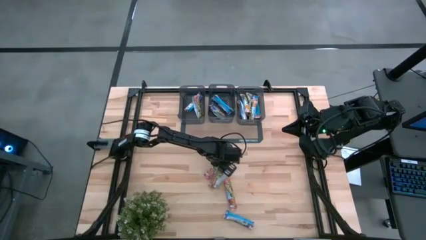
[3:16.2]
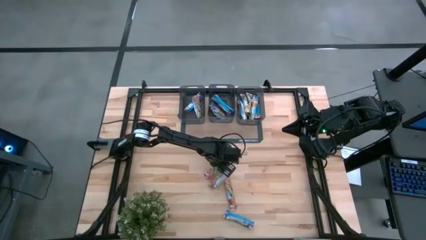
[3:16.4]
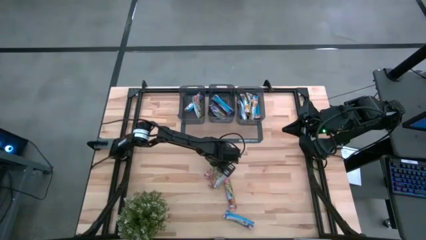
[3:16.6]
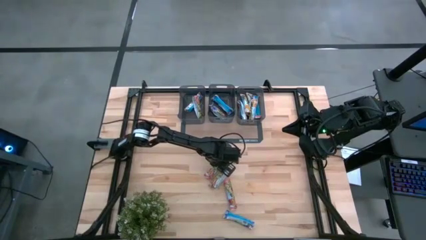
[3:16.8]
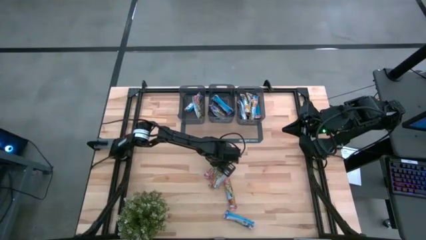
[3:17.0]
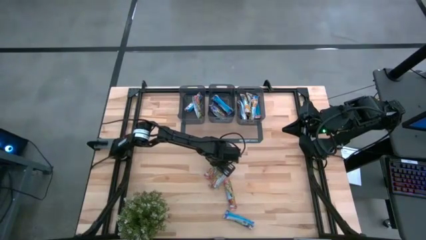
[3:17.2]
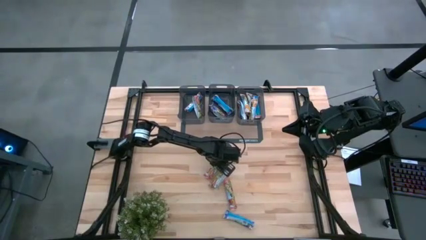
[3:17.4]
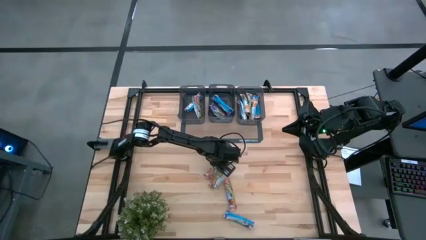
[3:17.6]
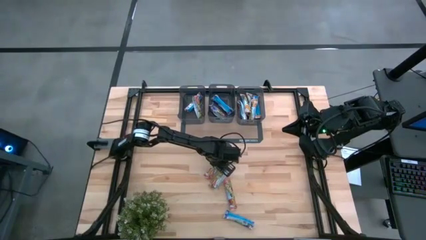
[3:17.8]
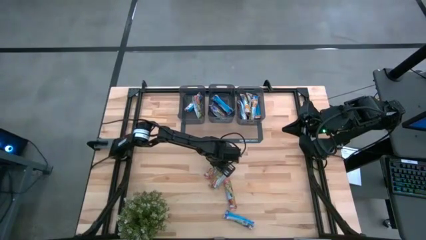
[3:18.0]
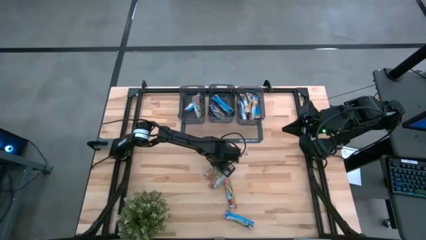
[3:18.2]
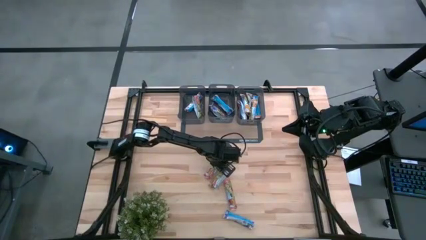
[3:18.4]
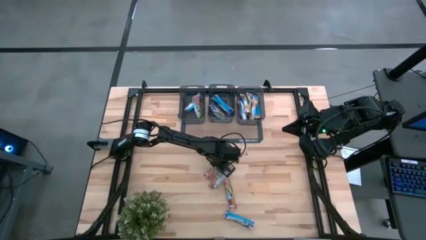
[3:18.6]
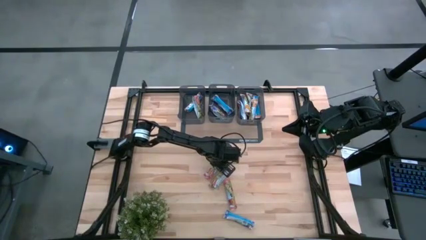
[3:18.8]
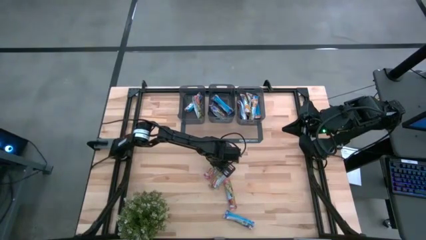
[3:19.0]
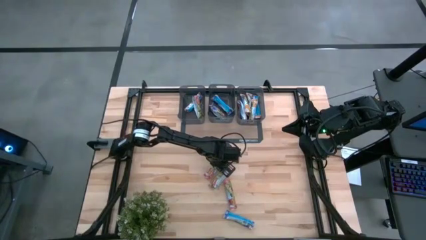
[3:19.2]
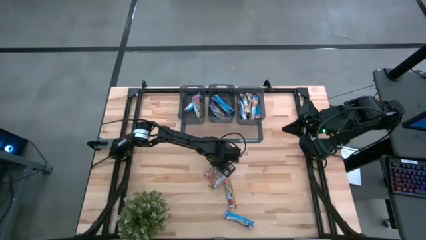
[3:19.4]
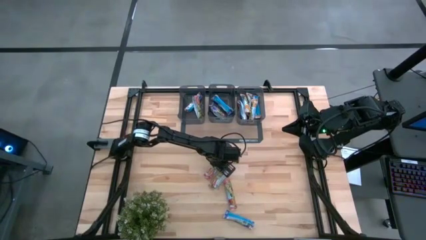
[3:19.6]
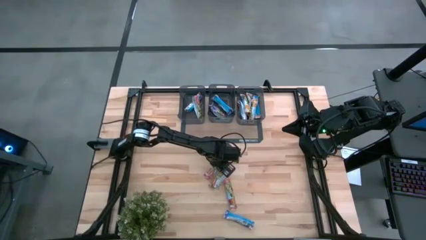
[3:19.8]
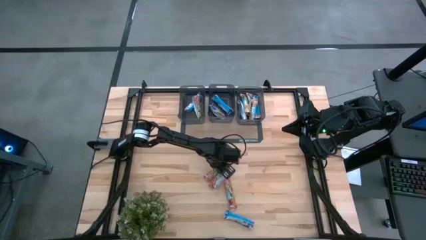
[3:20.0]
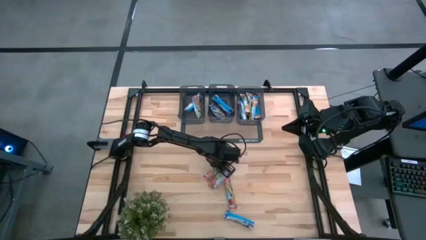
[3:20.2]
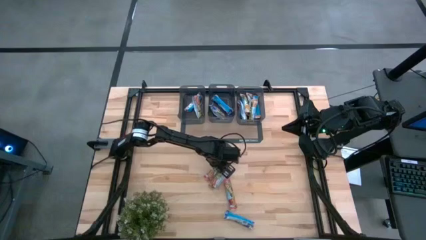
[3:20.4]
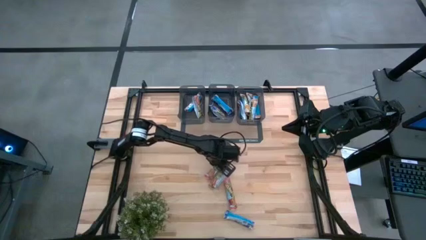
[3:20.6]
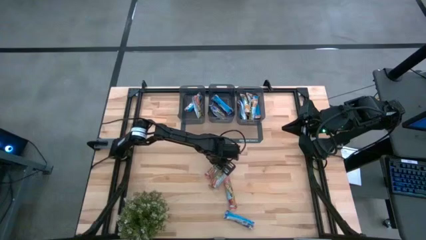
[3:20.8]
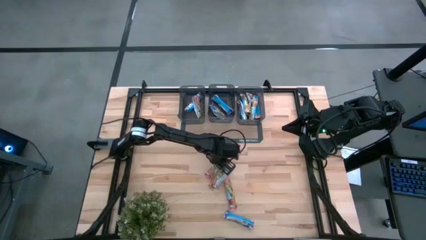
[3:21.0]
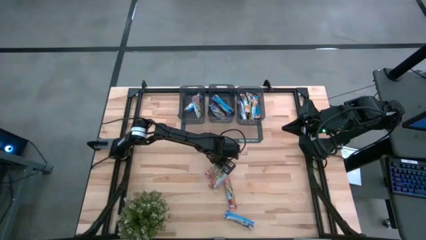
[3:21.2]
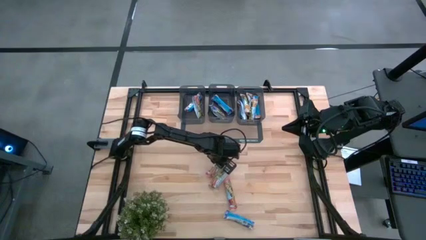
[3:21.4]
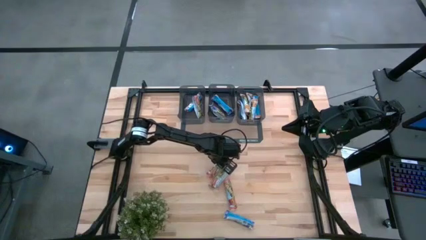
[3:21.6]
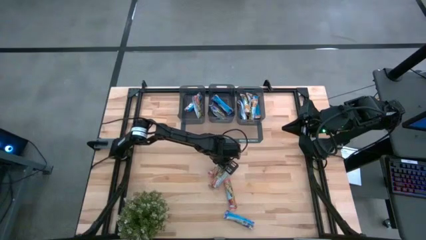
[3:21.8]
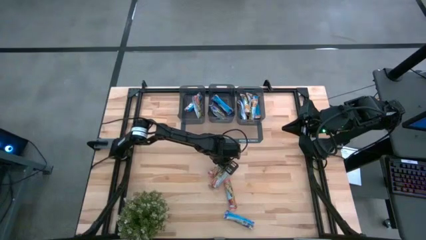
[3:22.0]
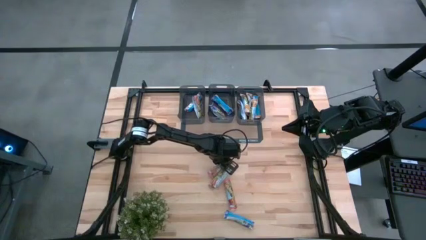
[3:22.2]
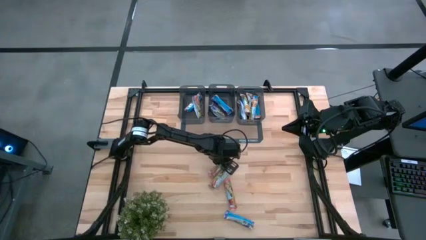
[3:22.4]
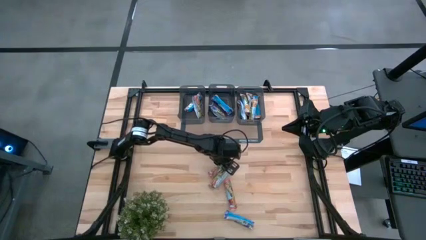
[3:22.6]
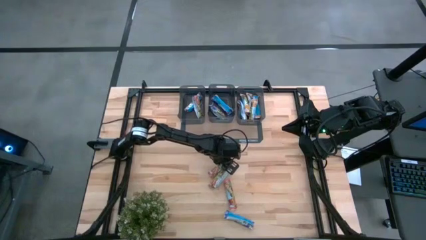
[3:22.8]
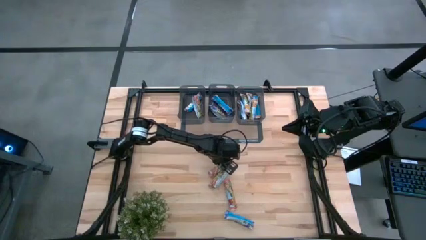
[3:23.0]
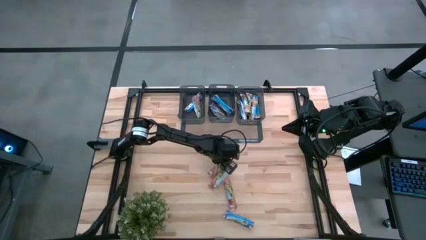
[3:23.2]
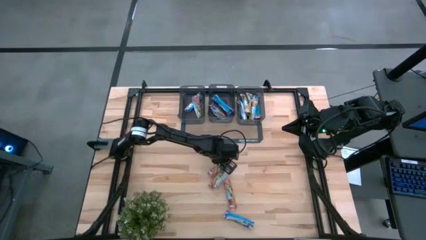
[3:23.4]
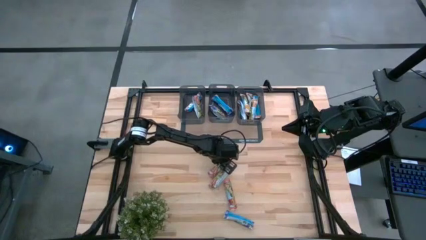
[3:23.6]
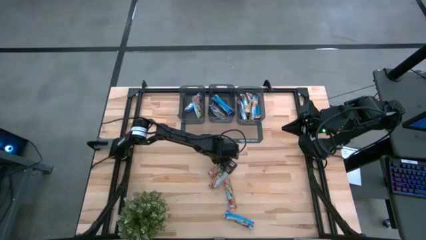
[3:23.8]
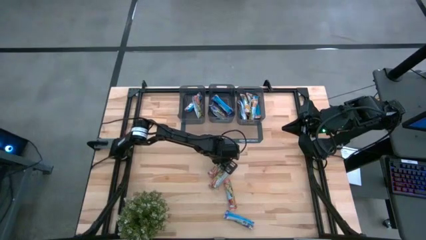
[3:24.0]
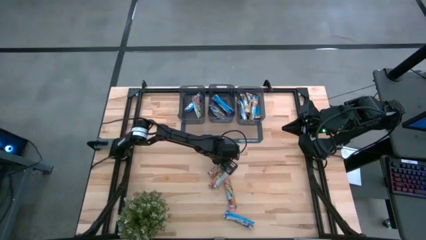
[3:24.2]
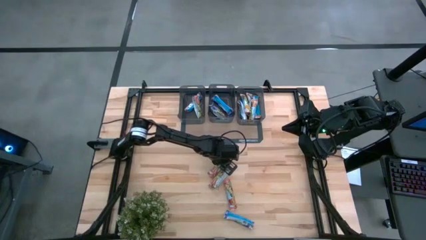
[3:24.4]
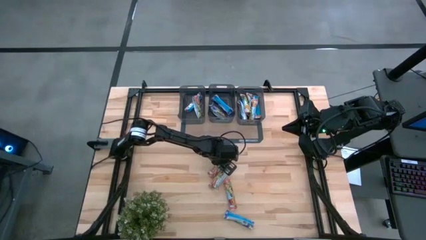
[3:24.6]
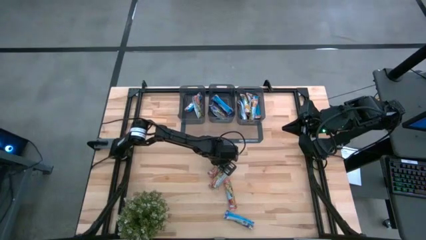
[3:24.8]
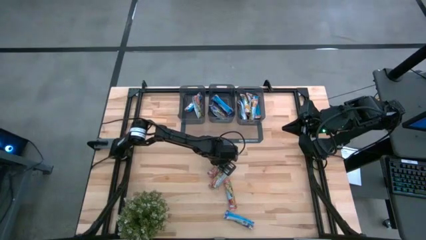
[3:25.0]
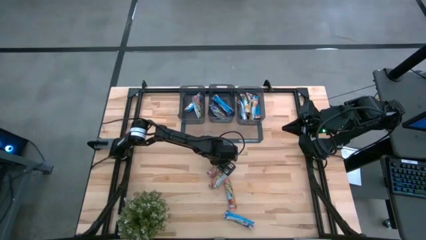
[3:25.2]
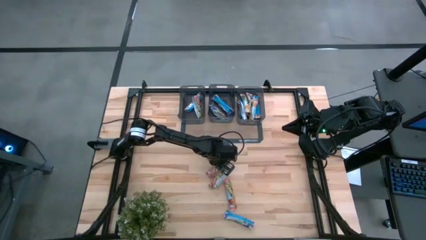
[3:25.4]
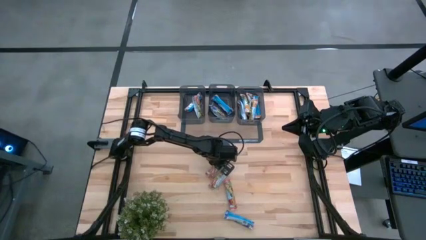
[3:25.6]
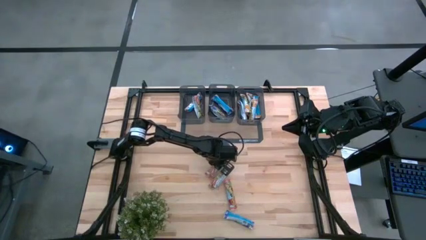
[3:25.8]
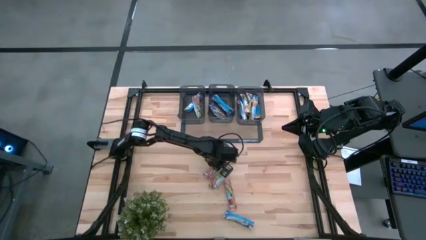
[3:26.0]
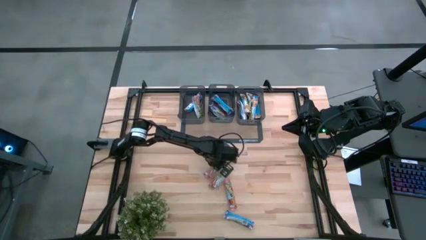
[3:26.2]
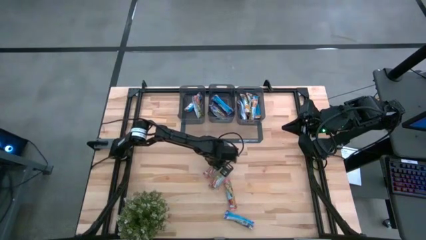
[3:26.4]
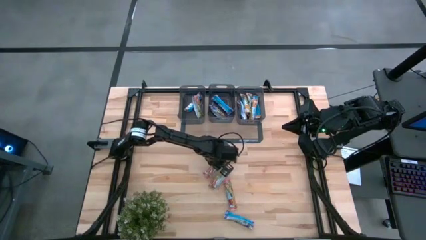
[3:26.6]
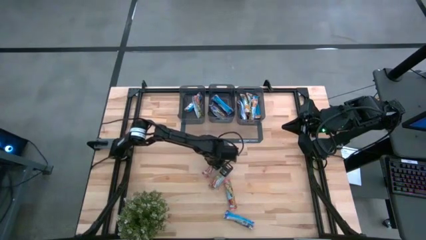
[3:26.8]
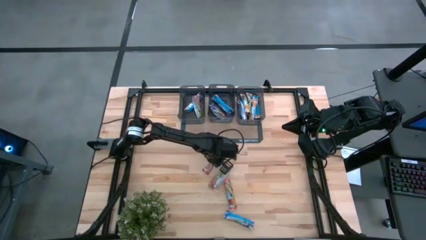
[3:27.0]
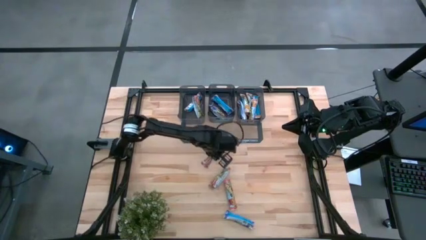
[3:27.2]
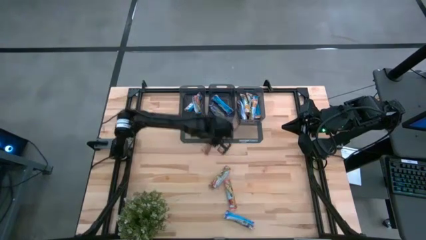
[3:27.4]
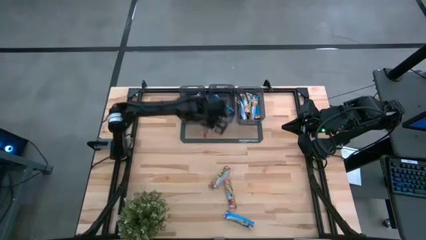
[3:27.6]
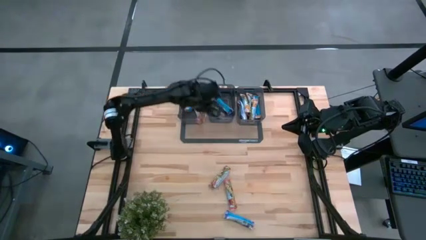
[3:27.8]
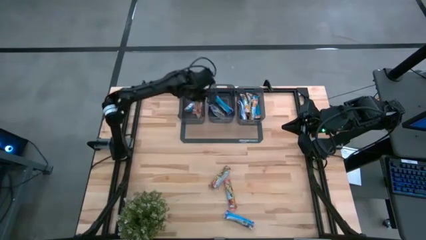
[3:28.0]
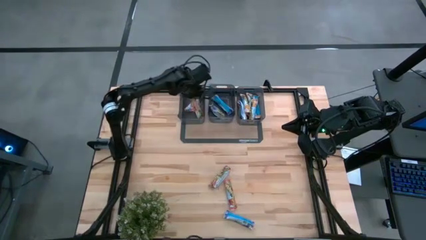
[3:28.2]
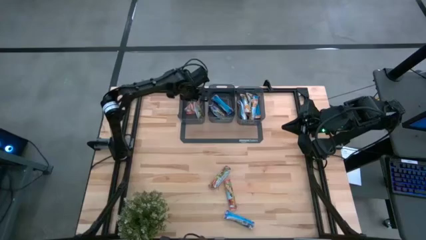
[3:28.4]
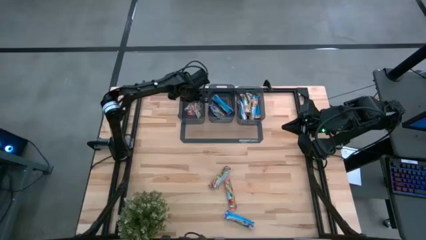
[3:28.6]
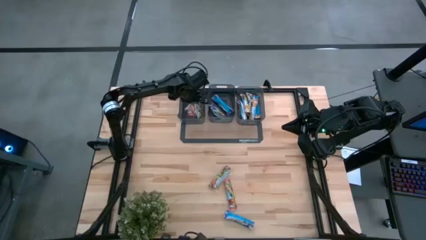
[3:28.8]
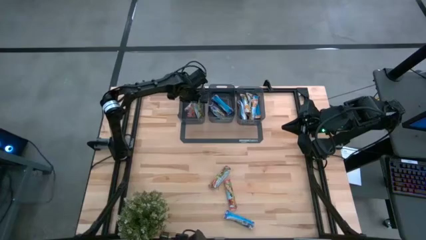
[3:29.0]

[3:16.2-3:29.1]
Task: Pick and place Granola Bars by type
Put the red granola bar into the left black bin

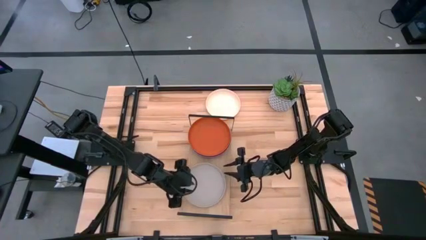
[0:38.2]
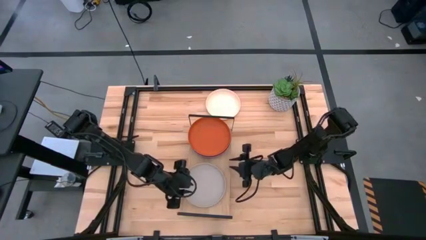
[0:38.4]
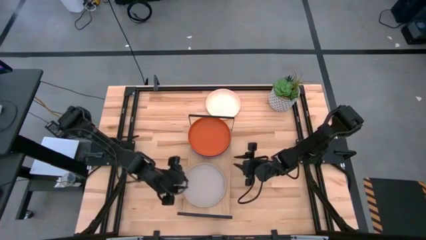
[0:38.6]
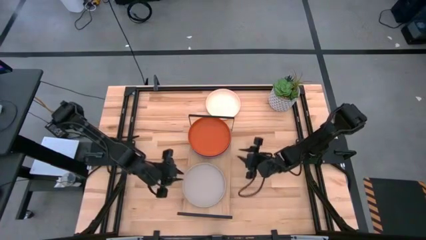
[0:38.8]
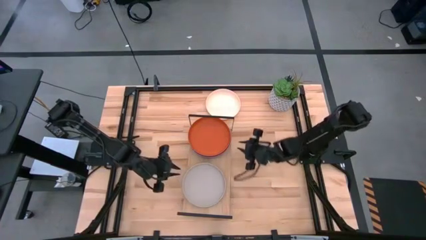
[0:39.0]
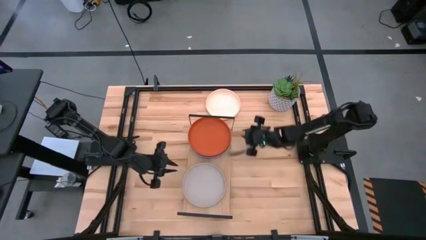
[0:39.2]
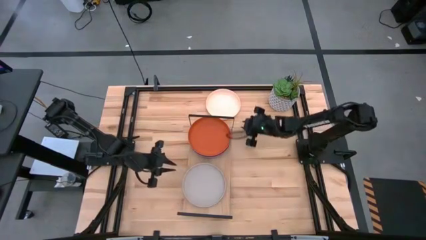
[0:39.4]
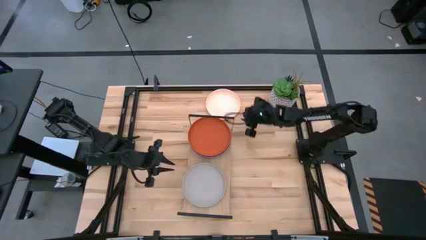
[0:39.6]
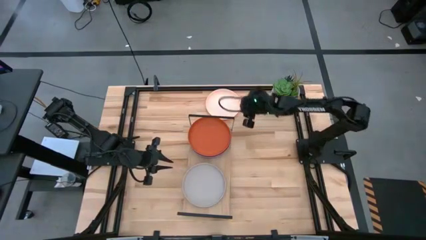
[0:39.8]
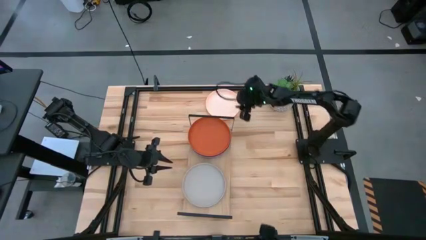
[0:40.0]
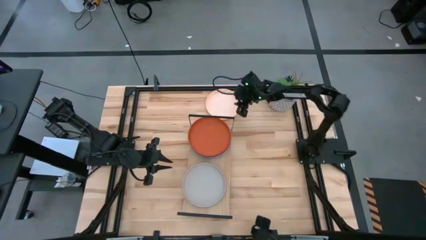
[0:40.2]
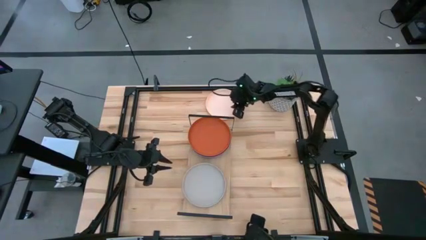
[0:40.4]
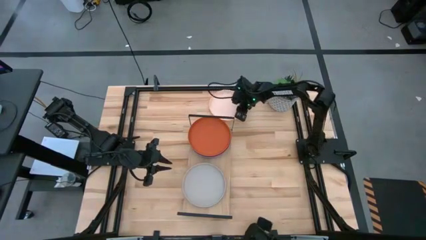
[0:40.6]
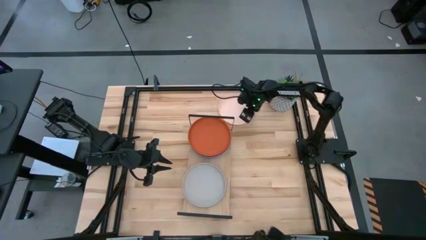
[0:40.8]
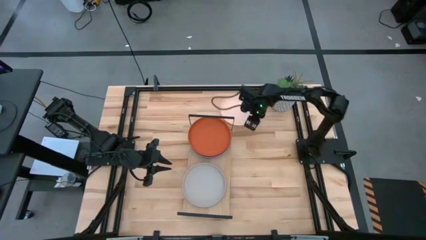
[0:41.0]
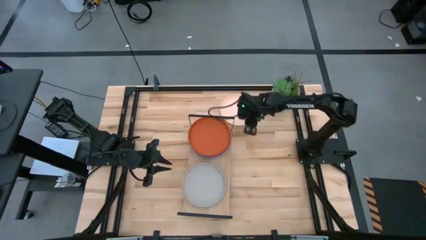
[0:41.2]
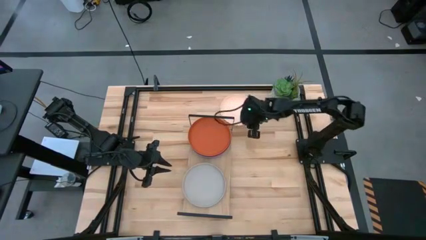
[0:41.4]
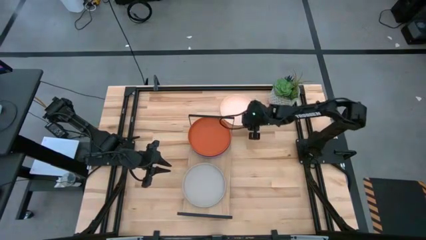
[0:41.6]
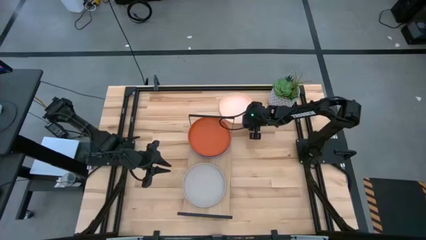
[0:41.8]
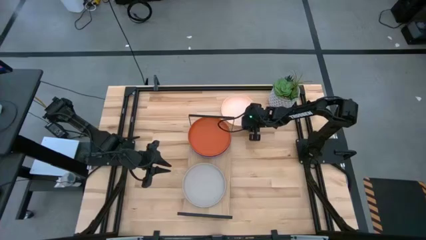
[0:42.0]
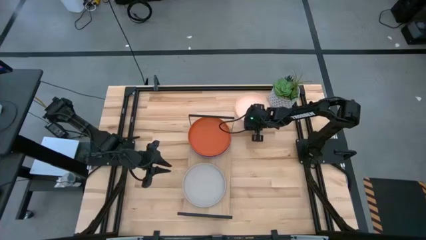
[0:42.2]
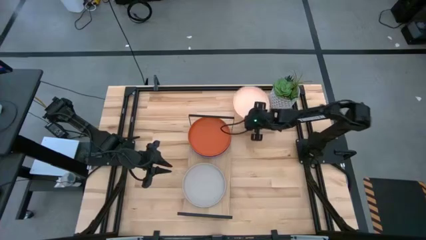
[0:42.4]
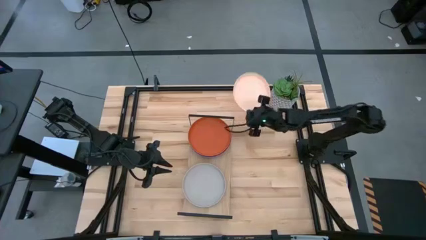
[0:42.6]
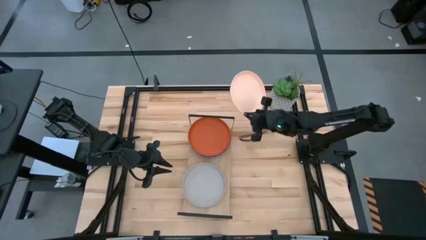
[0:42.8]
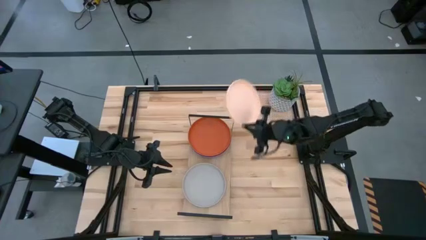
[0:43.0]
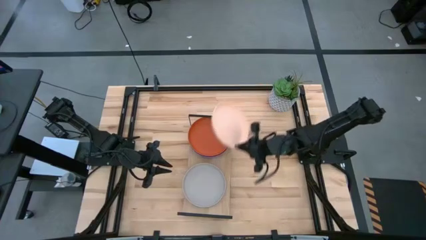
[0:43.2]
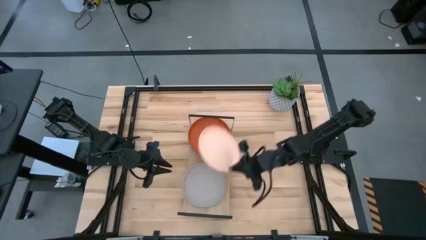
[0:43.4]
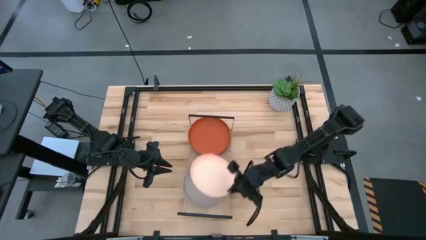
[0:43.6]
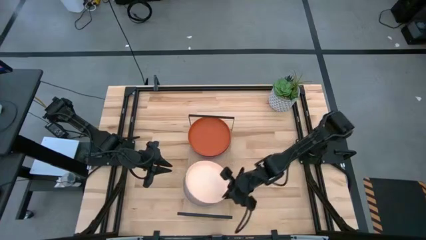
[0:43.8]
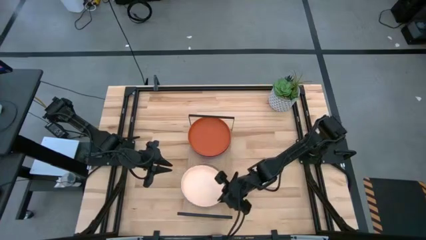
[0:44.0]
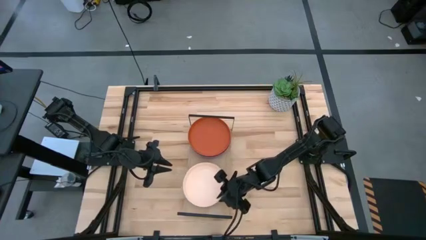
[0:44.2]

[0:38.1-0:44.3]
Task: Place and stack plates onto a shelf
Stack the light pink plate on top of the gray plate on the shelf
